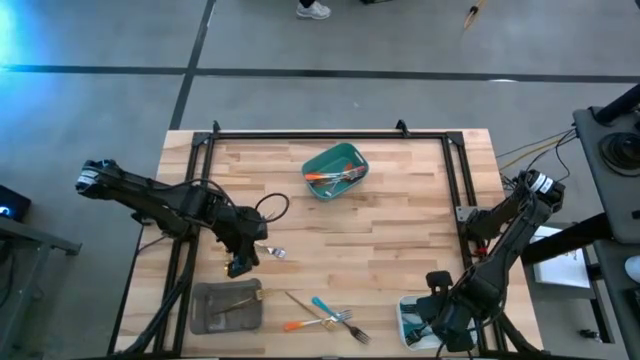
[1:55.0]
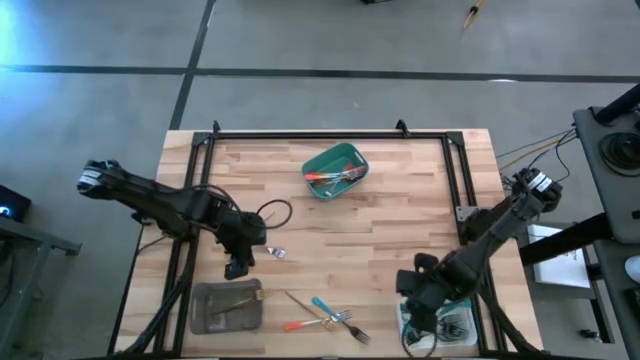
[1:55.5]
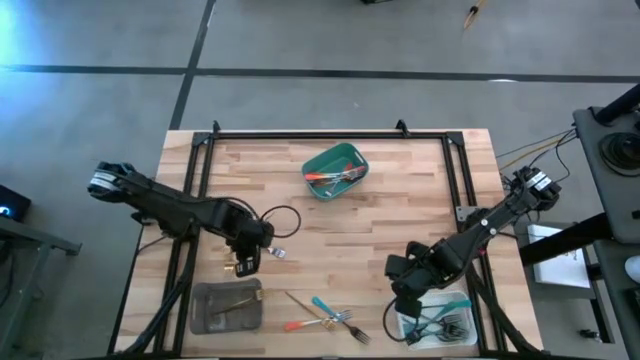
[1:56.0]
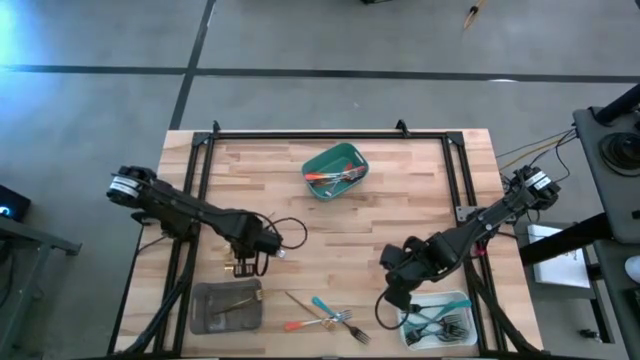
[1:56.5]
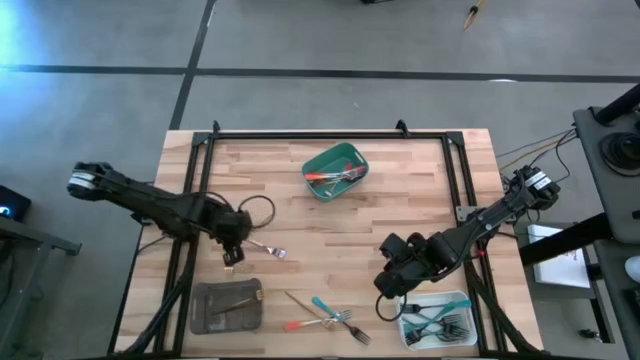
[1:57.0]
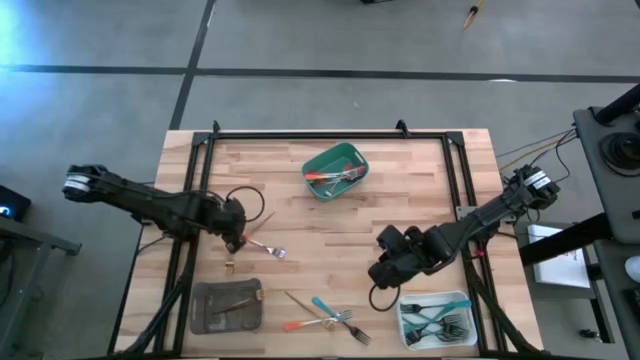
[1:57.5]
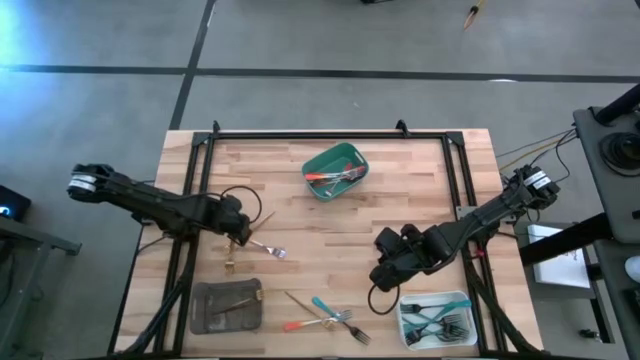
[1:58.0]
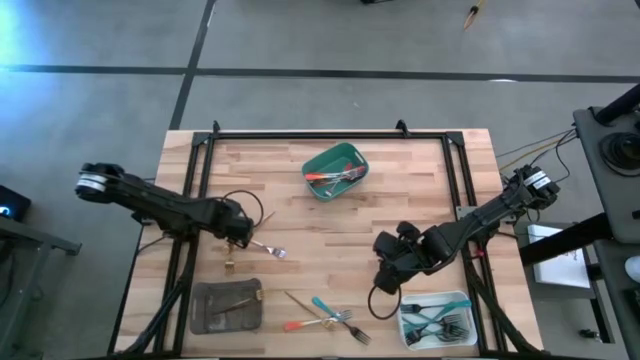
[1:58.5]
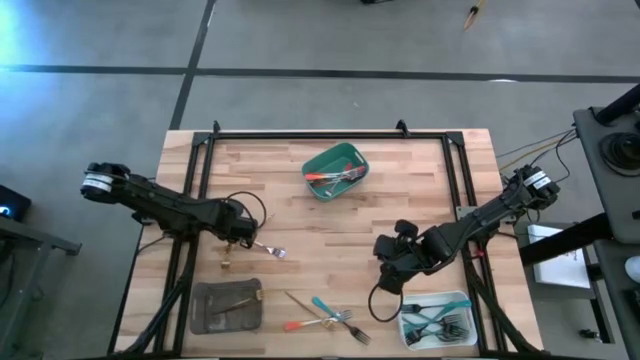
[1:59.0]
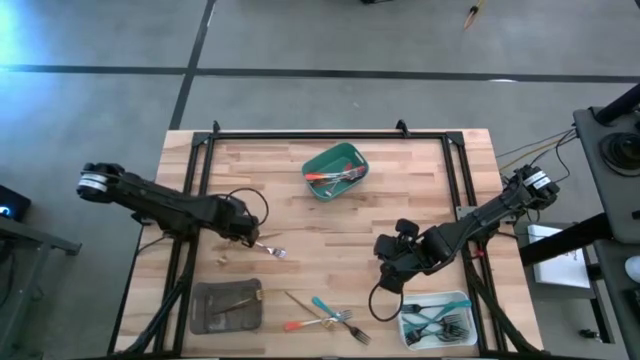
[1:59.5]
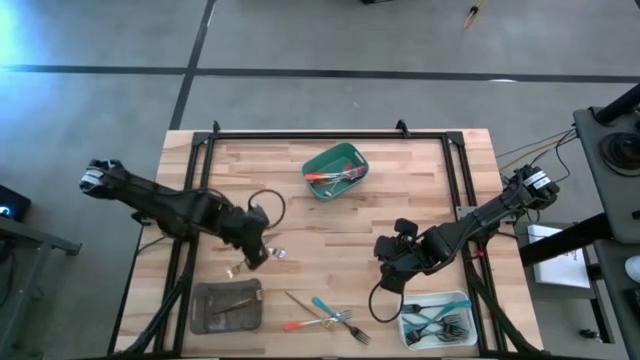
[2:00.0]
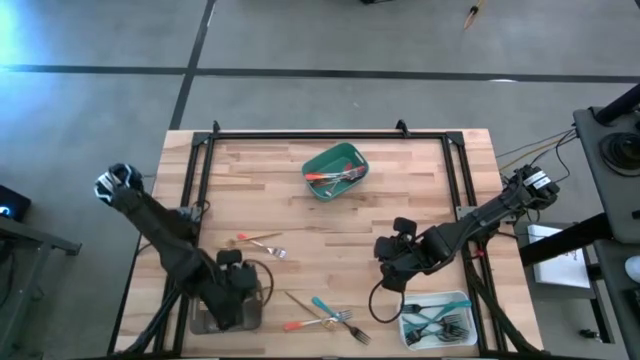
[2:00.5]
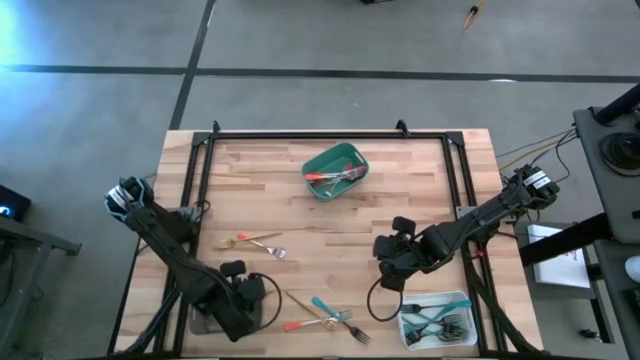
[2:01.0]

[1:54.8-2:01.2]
Task: Sort silverware by color (type)
Put the gold fork into the black bin

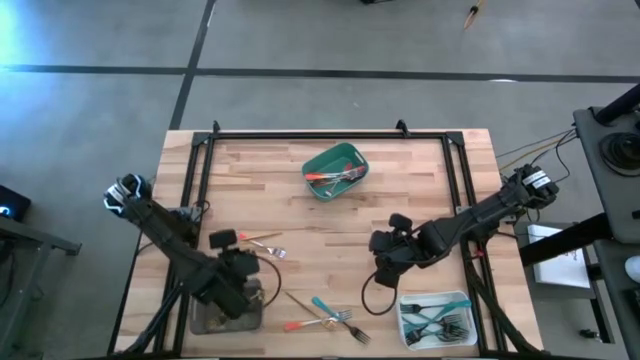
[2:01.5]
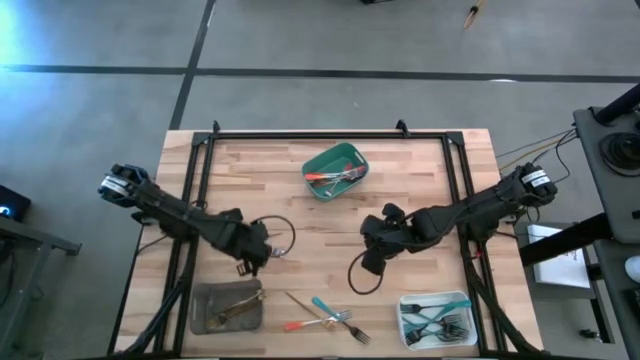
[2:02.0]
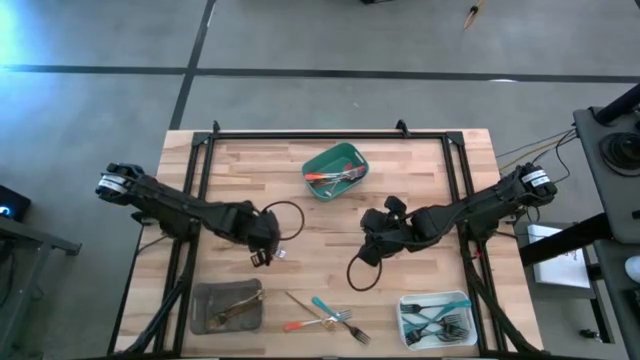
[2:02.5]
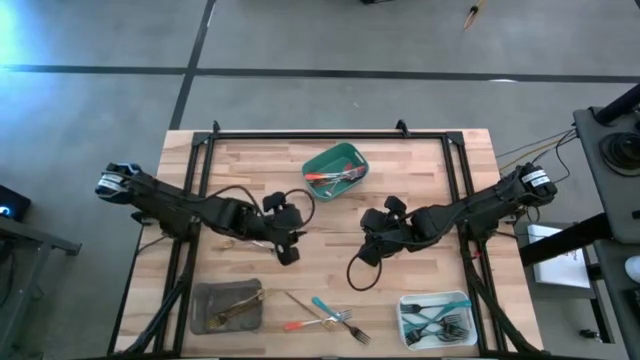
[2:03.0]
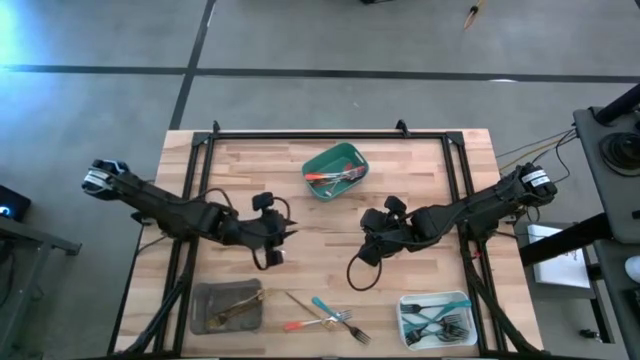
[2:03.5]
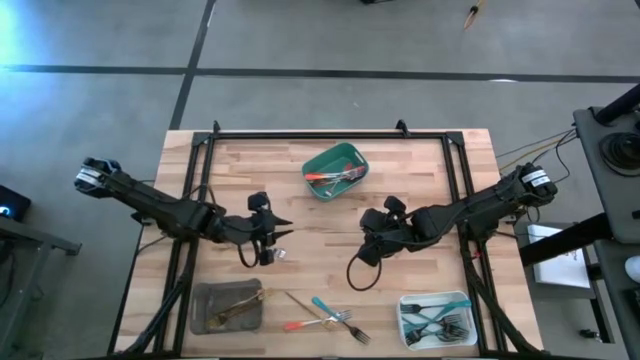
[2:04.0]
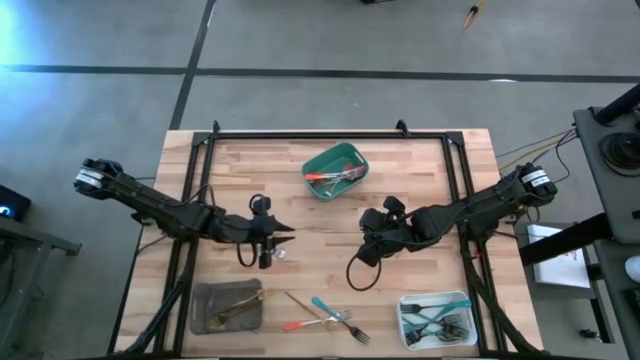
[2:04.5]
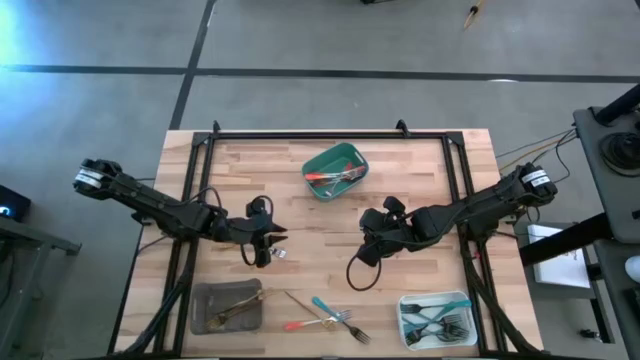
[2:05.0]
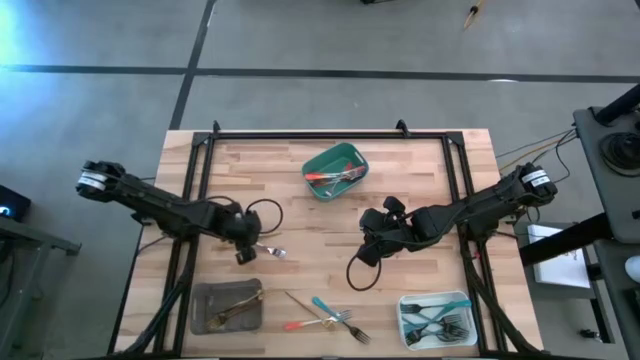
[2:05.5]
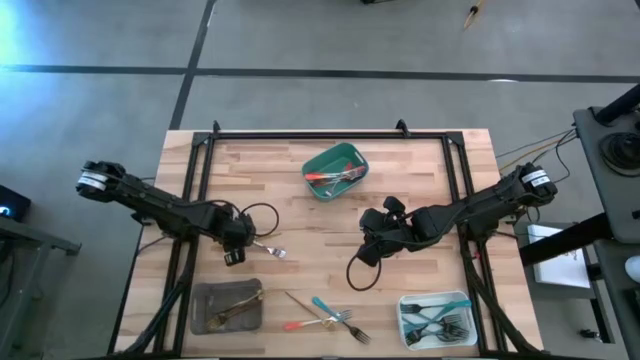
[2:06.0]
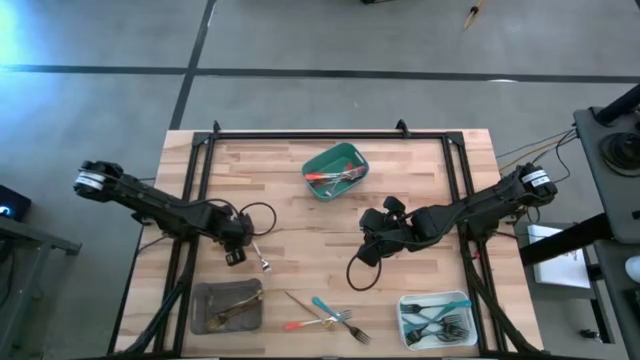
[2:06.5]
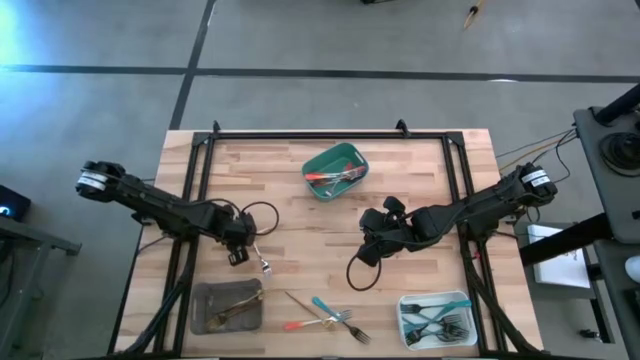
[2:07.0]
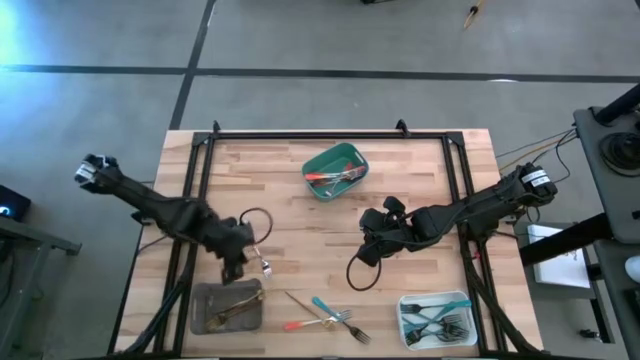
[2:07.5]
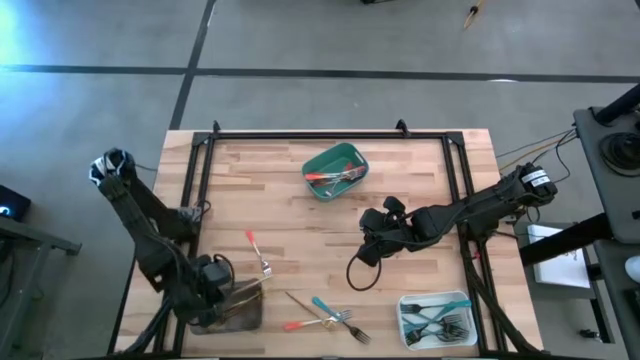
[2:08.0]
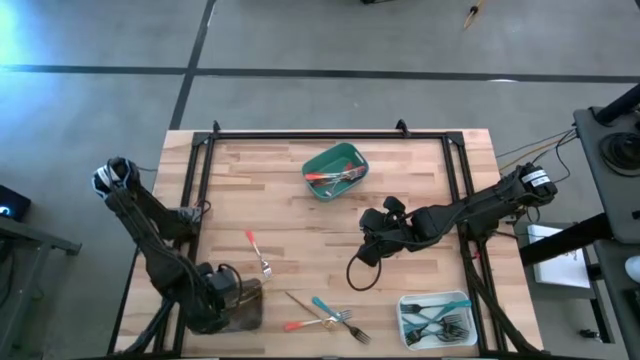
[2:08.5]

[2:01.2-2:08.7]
Put the gold fork into the black bin

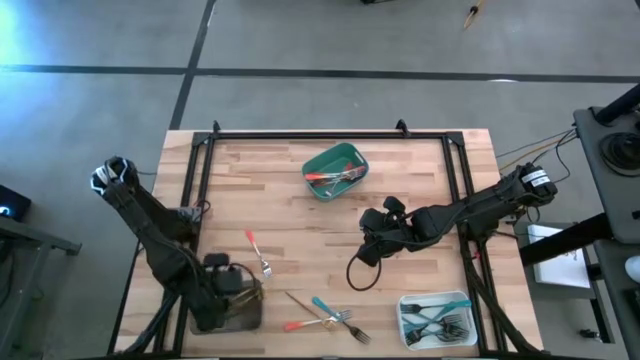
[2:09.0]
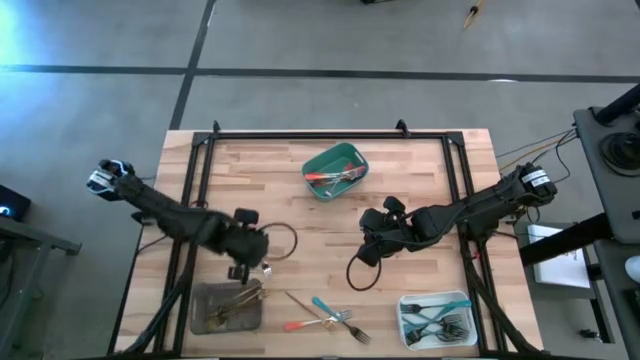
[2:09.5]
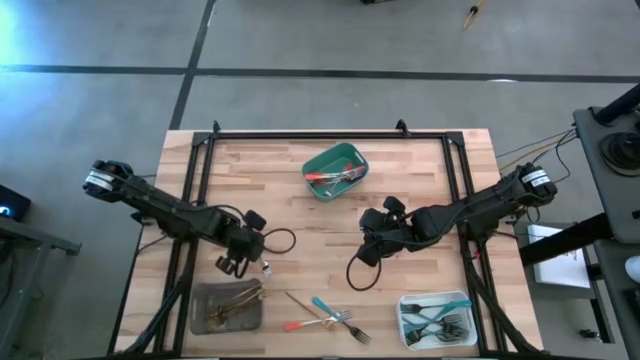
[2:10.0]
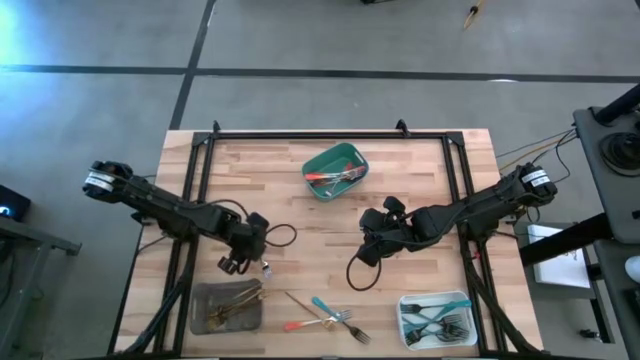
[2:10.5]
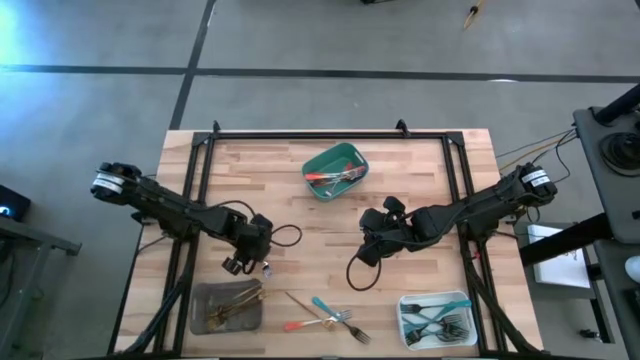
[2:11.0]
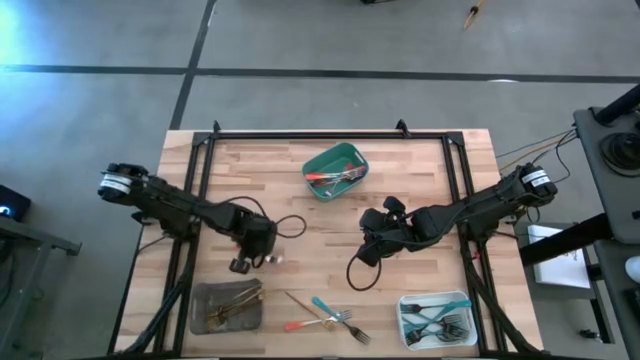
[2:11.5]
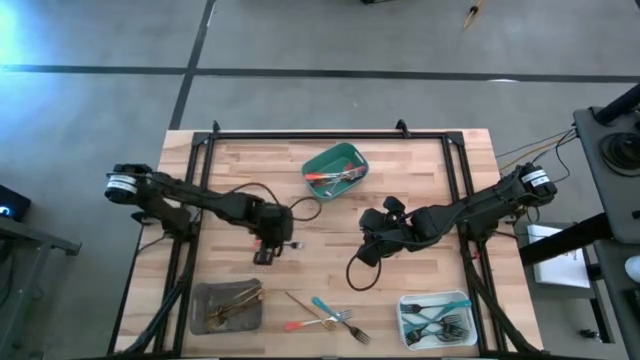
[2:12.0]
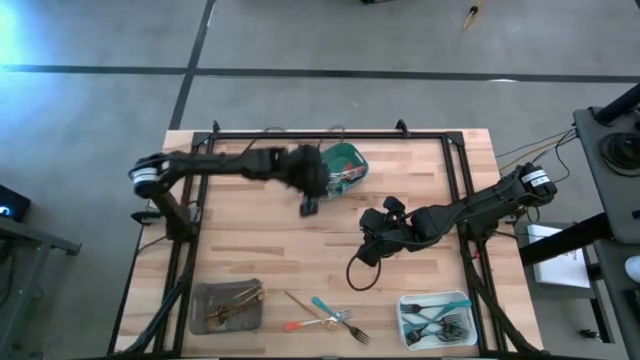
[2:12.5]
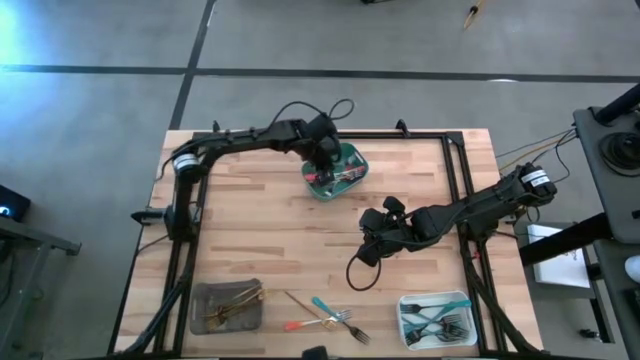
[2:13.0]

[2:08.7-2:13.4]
Put the orange fork into the green bin

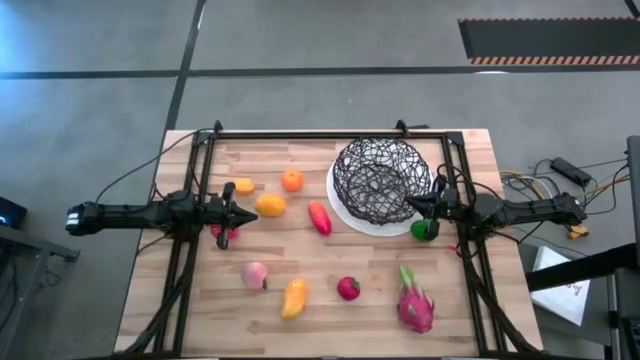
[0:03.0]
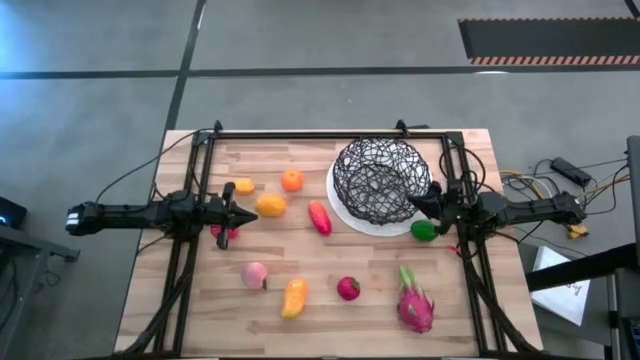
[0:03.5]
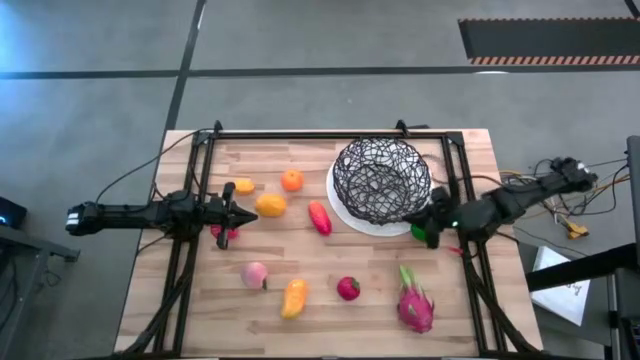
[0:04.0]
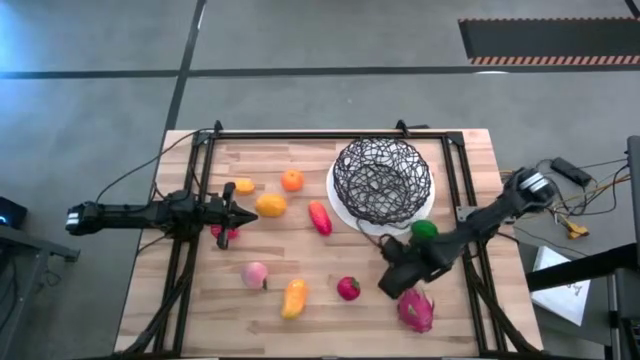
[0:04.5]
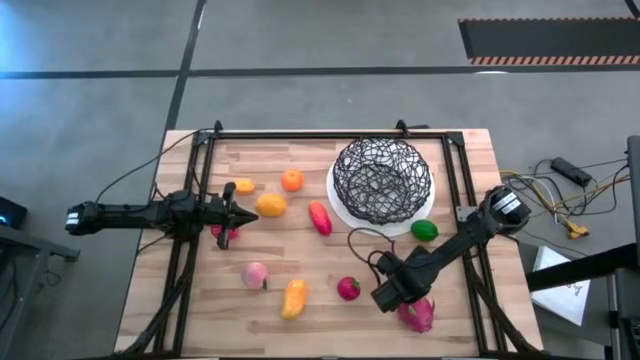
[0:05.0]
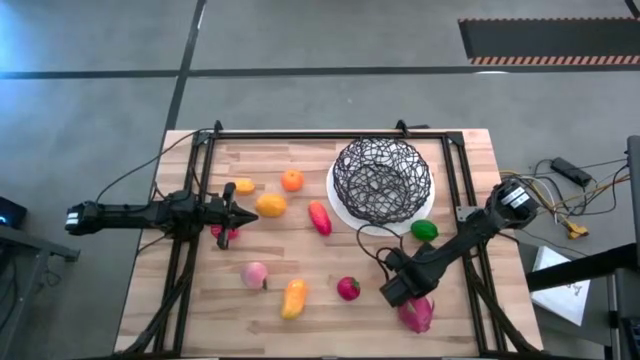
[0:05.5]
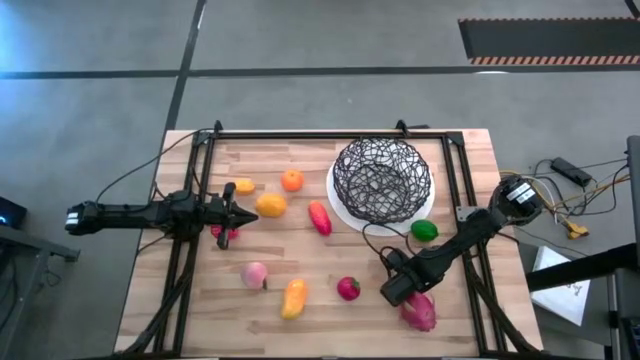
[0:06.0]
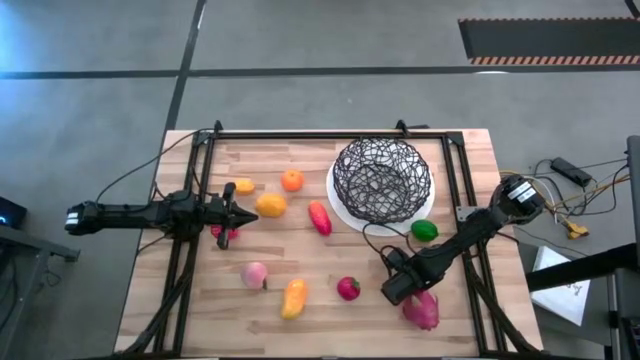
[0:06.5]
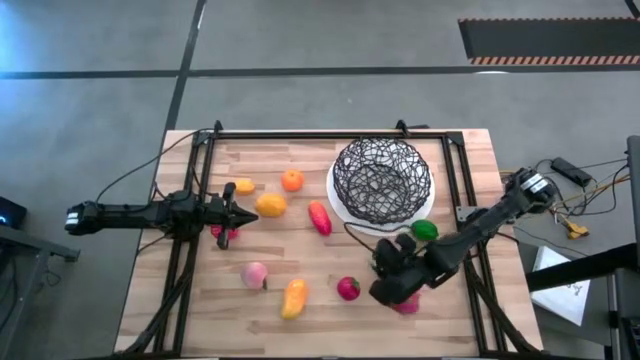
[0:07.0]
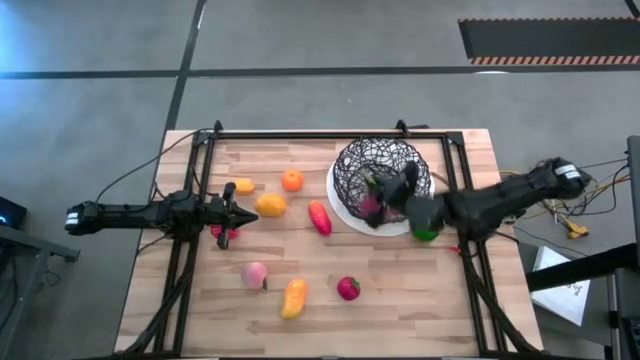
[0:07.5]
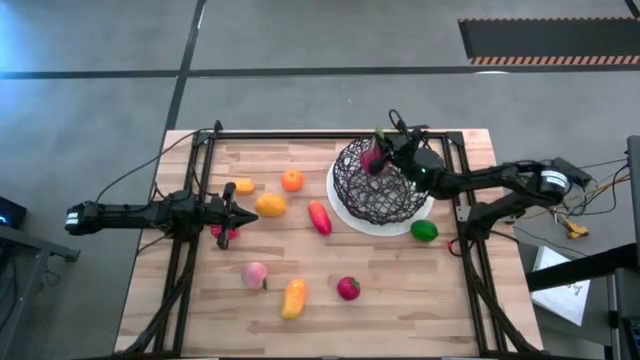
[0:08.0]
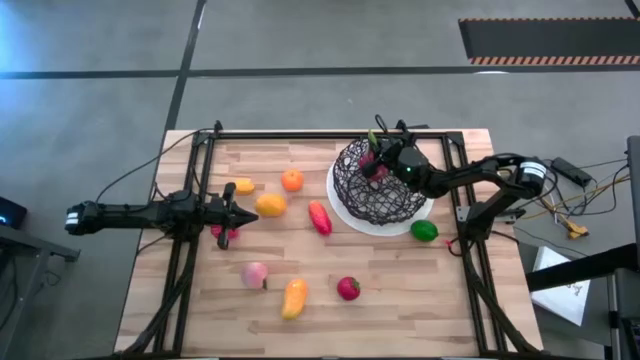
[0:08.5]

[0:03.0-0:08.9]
Task: Build produce basket
Put the dragon fruit into the black basket
